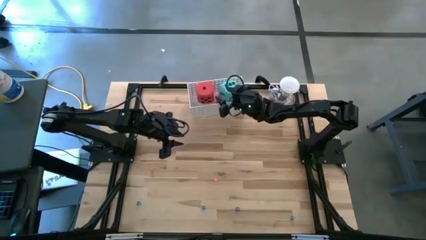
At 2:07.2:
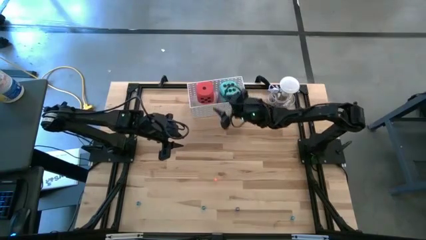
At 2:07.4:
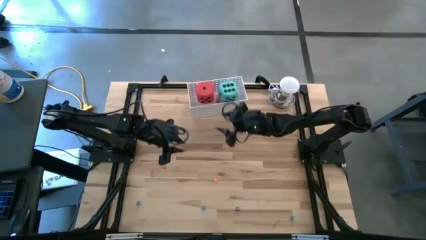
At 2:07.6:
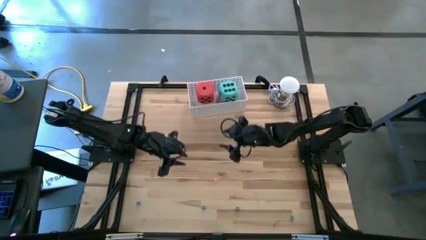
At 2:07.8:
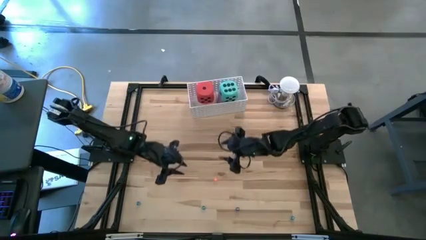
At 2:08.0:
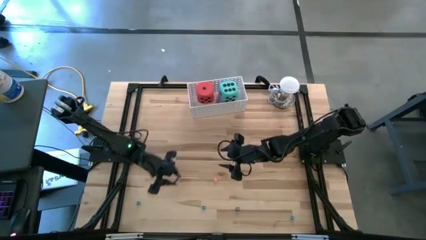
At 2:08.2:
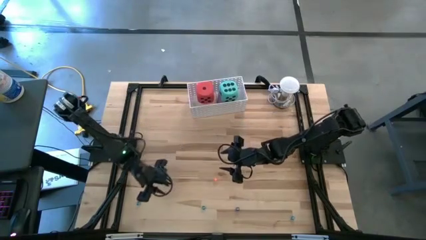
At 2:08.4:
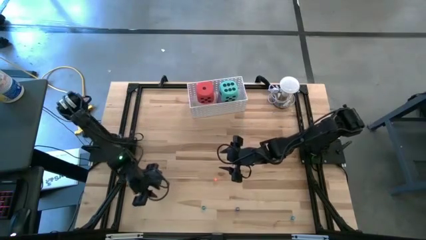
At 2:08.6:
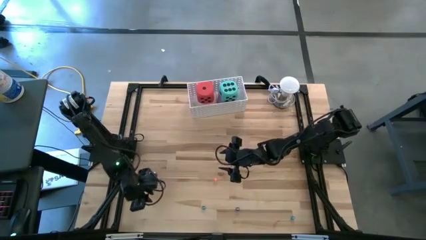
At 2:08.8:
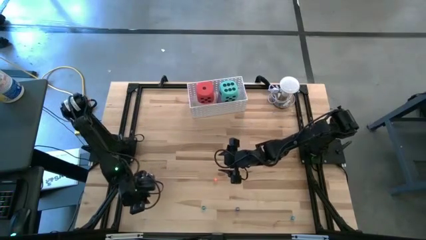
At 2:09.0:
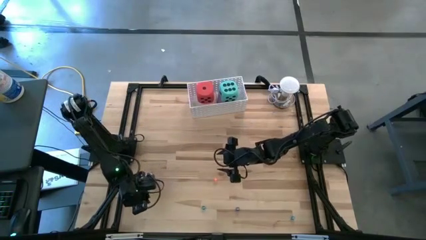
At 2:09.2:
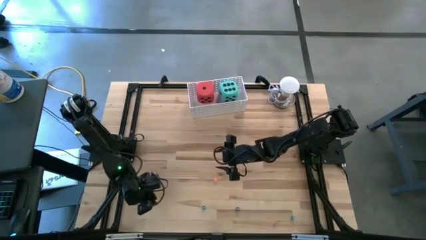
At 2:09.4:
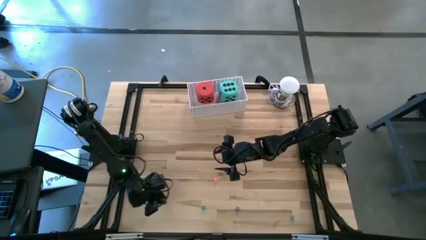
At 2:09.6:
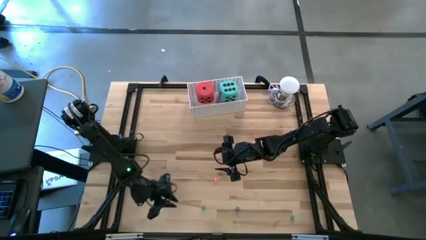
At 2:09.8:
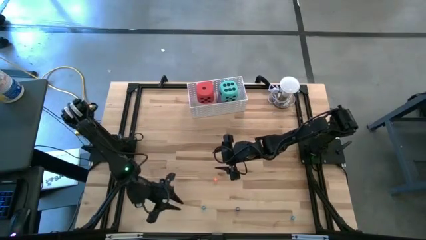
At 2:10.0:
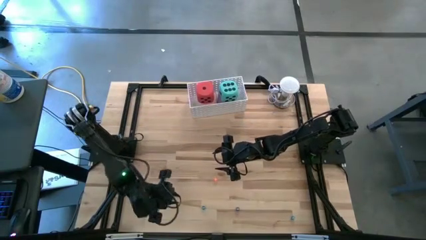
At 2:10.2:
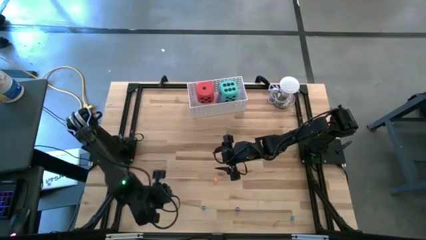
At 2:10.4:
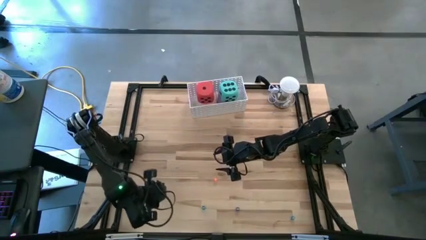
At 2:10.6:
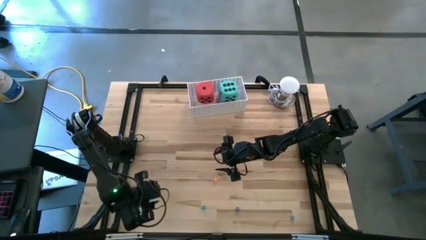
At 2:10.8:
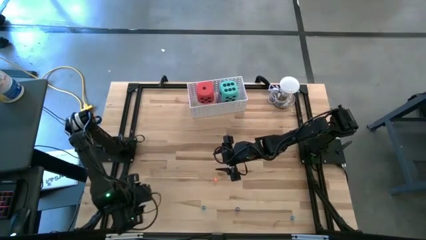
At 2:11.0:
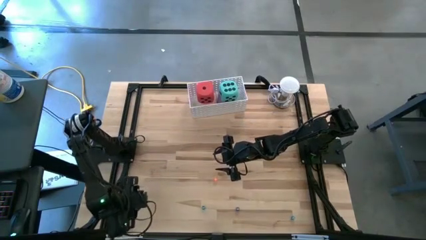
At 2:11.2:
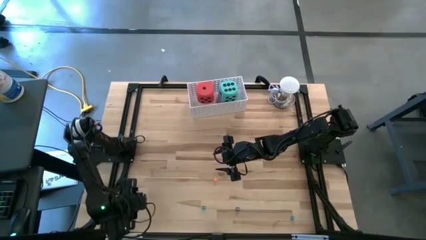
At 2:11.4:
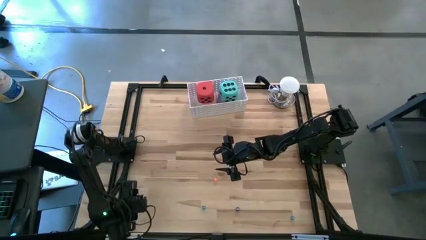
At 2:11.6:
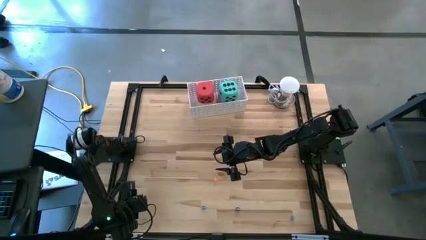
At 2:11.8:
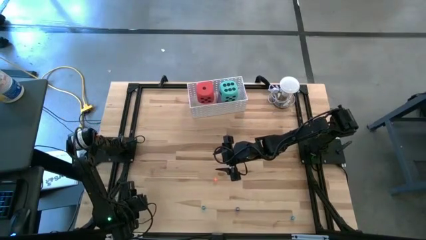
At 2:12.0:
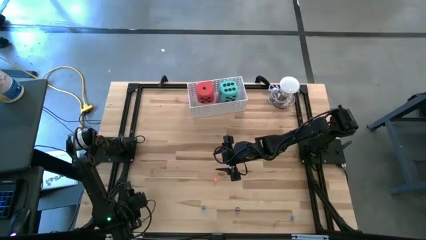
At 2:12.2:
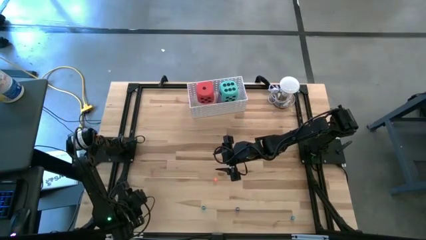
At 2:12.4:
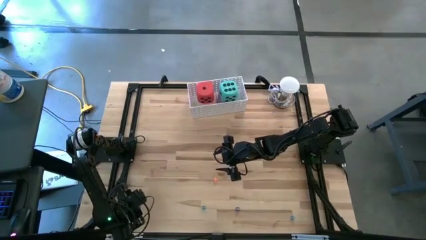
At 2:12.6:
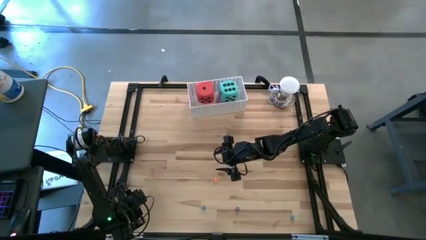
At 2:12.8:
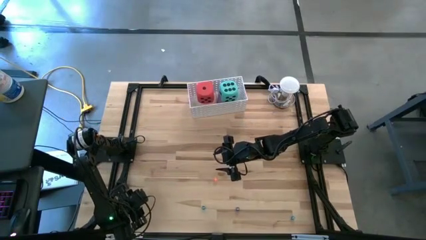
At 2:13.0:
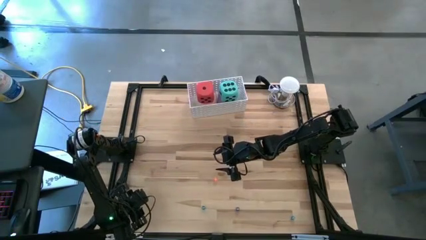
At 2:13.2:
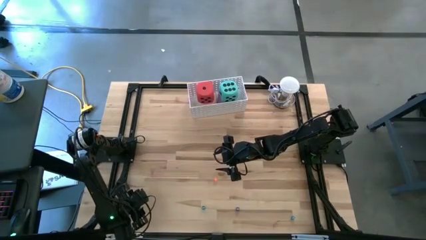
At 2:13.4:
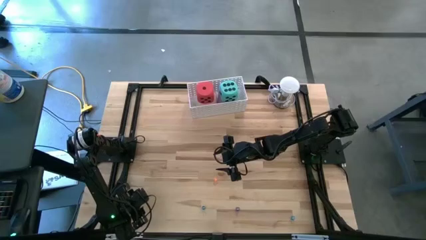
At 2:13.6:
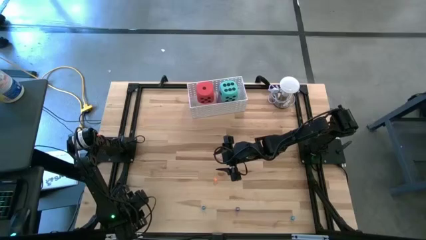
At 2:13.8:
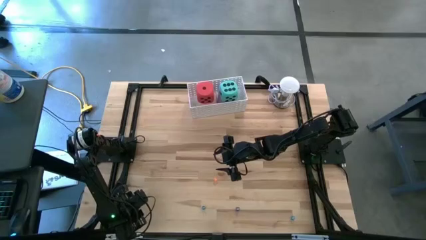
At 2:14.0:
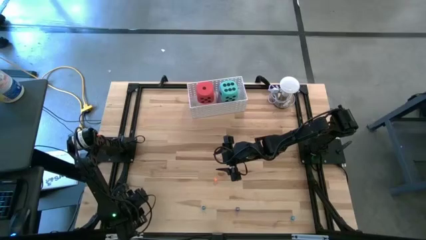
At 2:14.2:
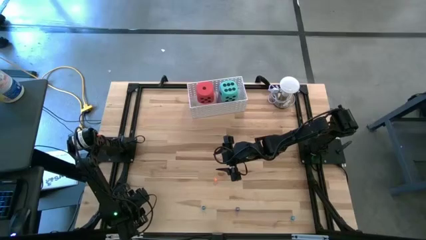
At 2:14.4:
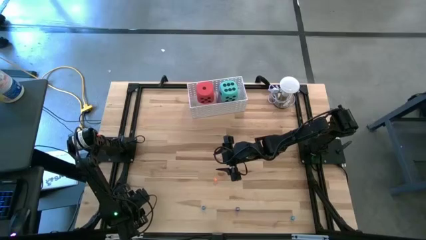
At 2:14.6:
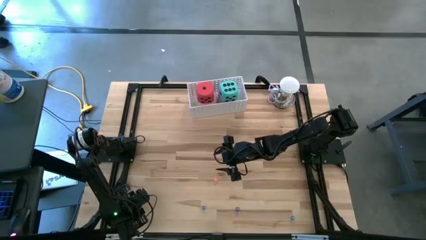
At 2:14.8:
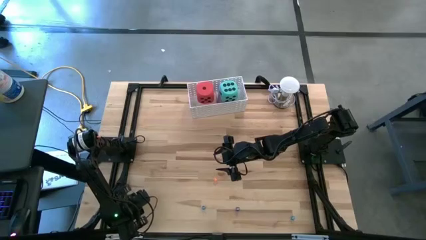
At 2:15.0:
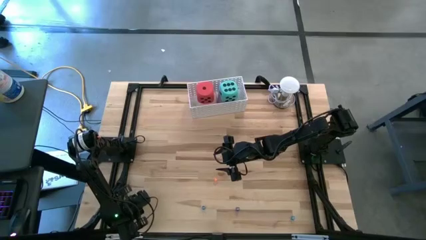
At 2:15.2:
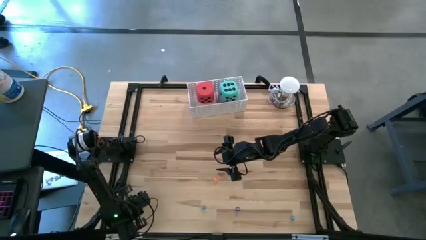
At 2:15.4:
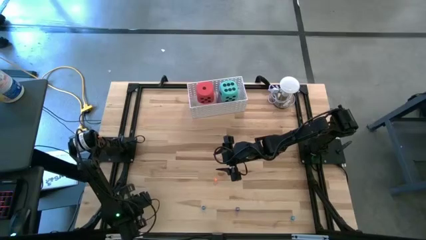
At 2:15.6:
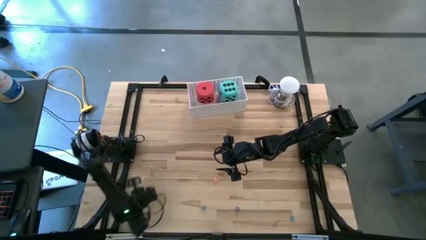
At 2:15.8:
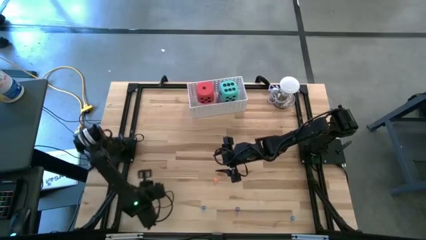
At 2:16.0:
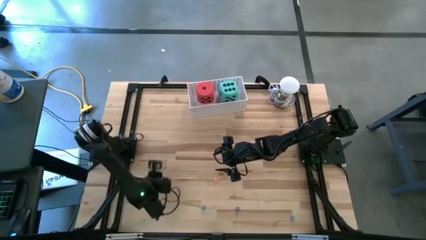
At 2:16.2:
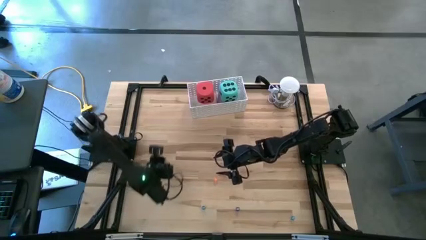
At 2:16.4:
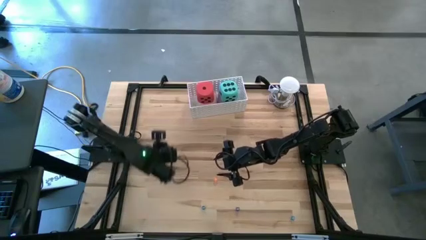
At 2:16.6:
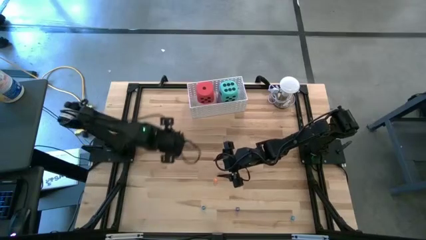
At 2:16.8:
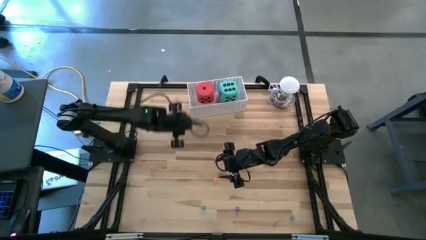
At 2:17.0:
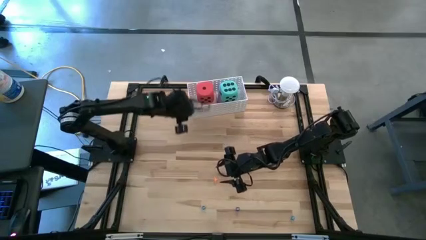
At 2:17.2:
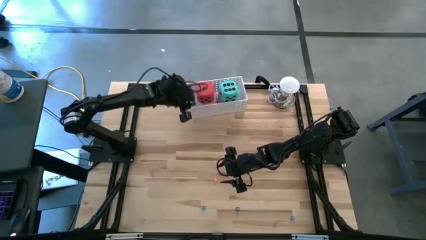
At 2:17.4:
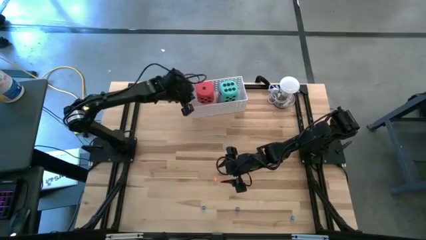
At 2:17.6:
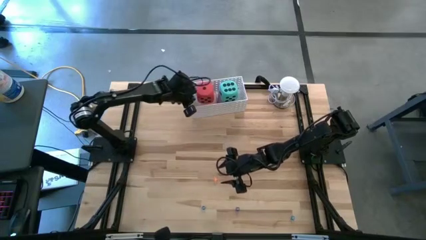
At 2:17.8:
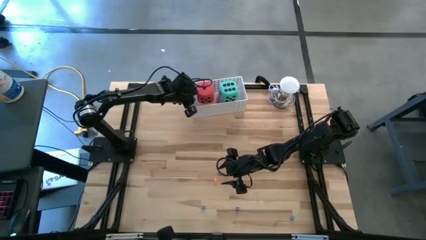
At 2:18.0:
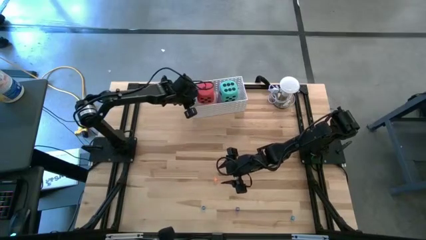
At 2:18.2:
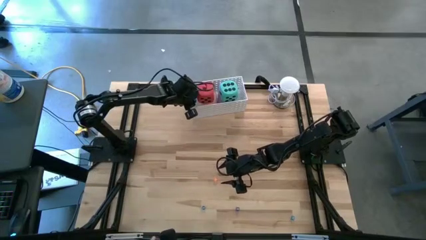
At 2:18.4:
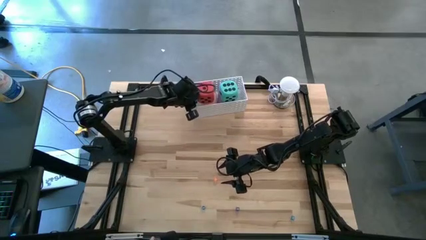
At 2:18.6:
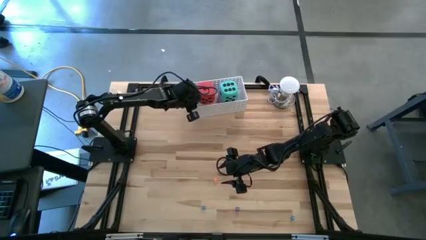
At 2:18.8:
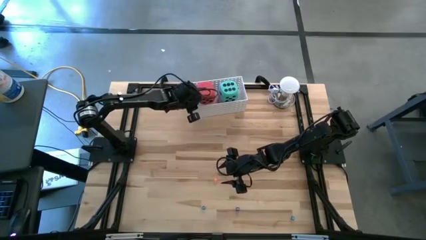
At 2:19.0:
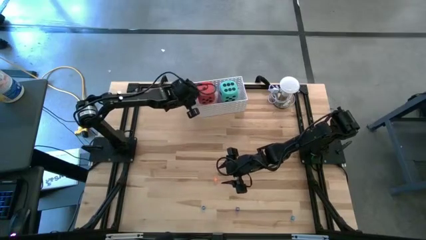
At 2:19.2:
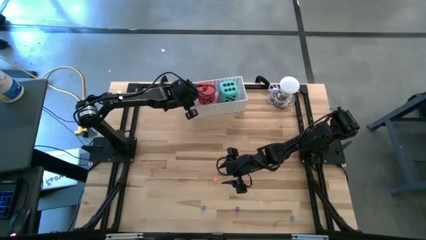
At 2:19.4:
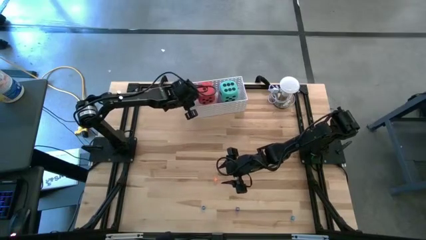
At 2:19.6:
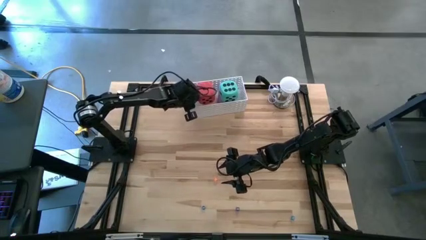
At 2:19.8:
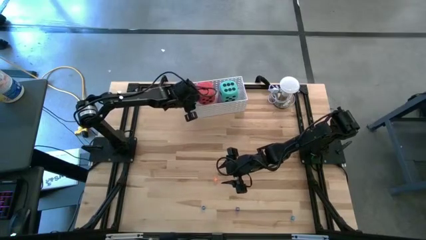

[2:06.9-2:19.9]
Task: Pick & Place Dice
Put the left small light blue dice into the white bin

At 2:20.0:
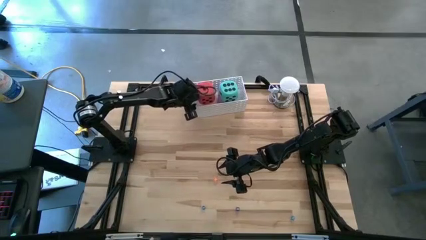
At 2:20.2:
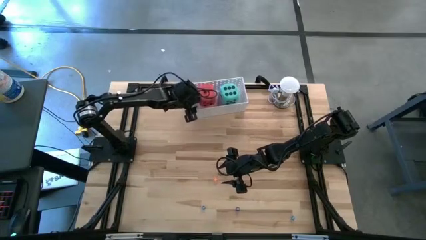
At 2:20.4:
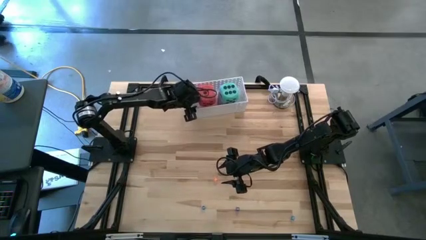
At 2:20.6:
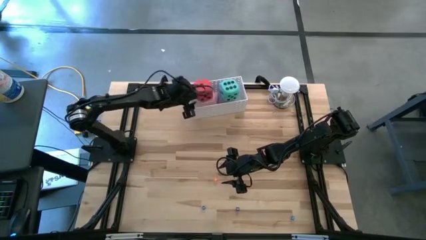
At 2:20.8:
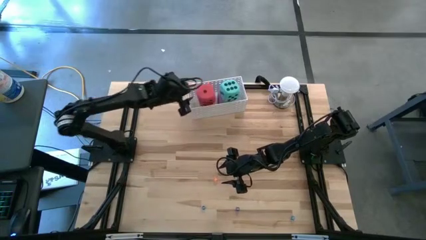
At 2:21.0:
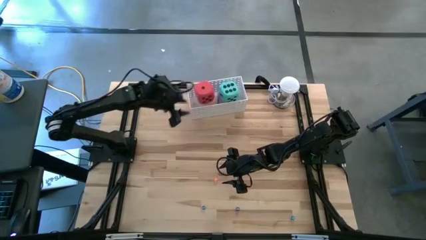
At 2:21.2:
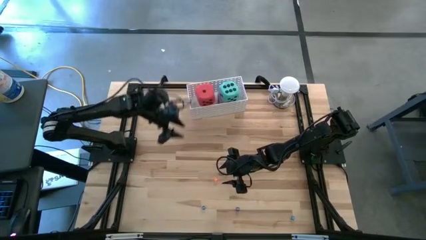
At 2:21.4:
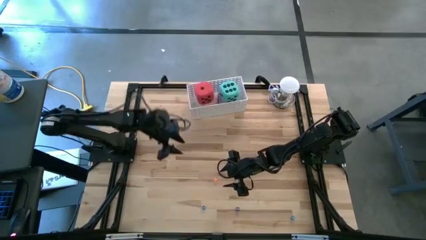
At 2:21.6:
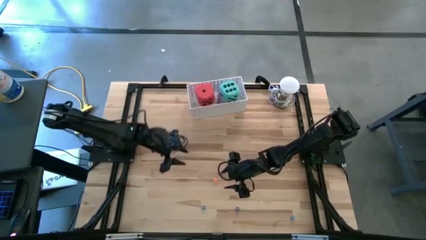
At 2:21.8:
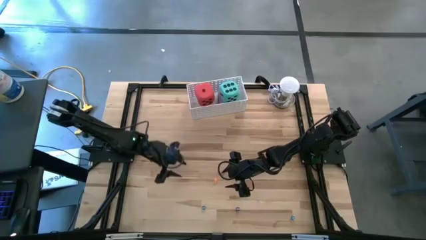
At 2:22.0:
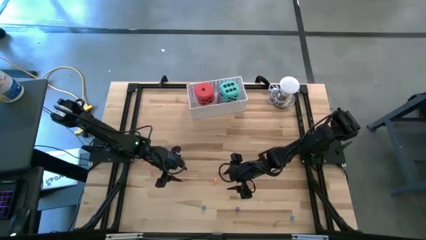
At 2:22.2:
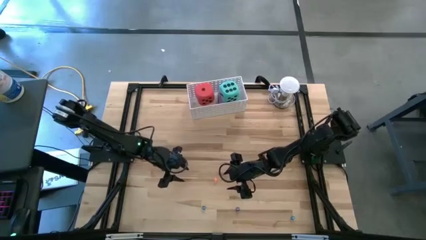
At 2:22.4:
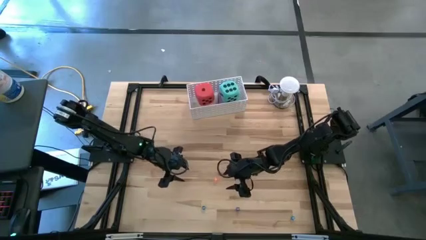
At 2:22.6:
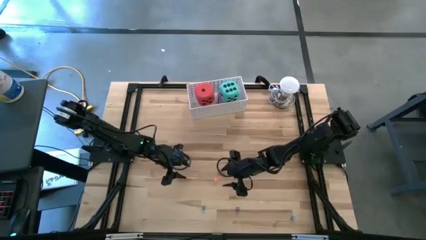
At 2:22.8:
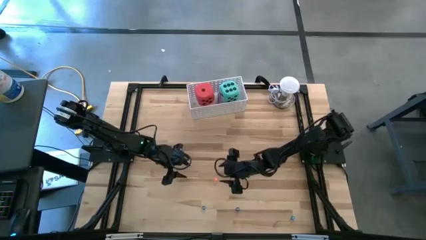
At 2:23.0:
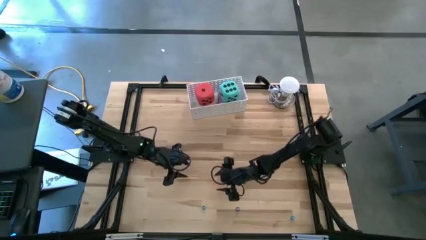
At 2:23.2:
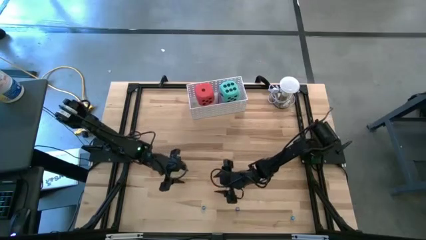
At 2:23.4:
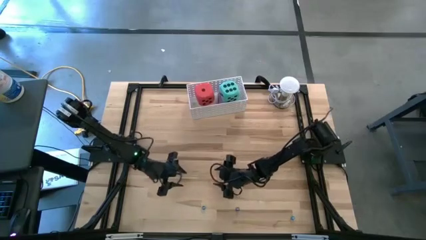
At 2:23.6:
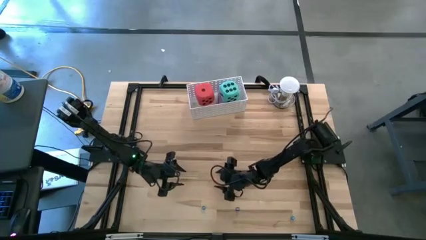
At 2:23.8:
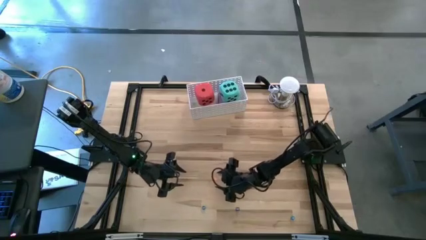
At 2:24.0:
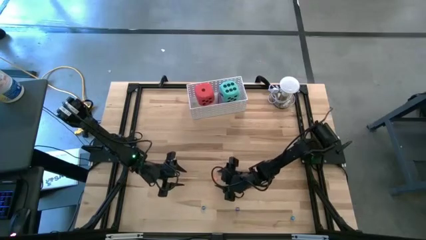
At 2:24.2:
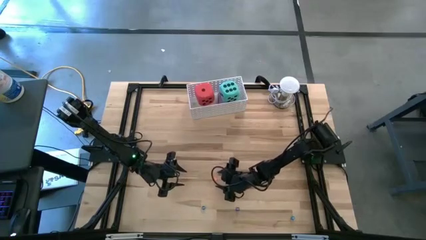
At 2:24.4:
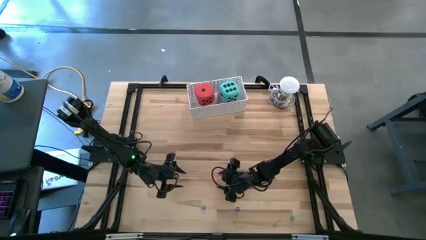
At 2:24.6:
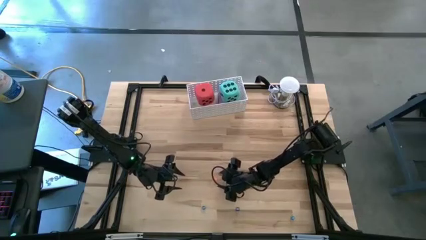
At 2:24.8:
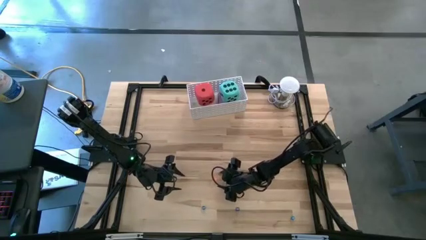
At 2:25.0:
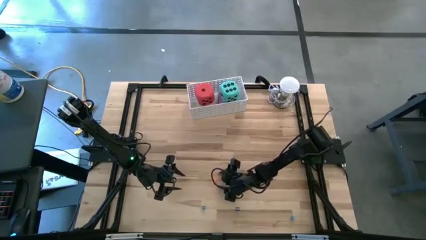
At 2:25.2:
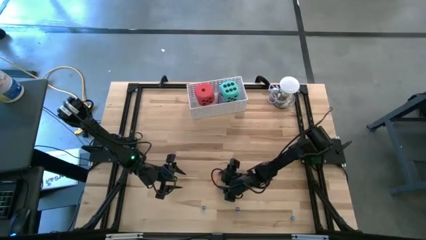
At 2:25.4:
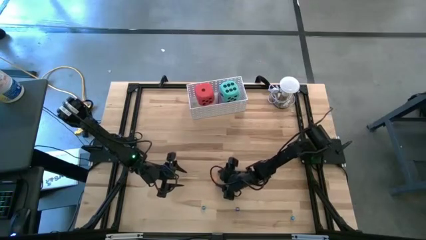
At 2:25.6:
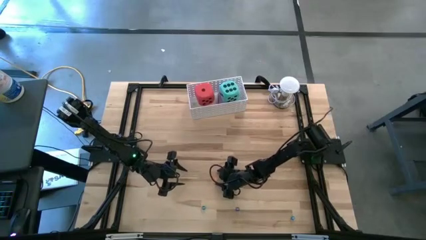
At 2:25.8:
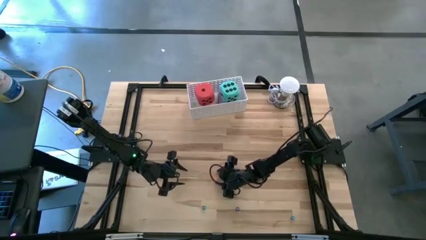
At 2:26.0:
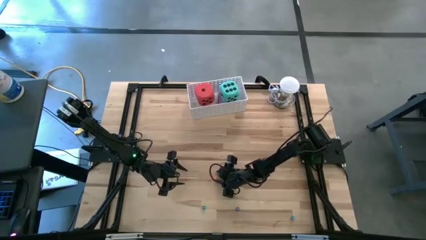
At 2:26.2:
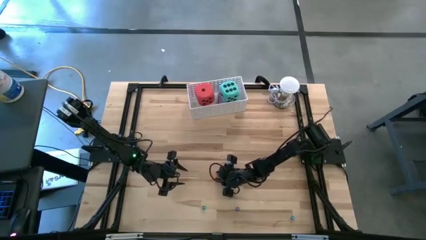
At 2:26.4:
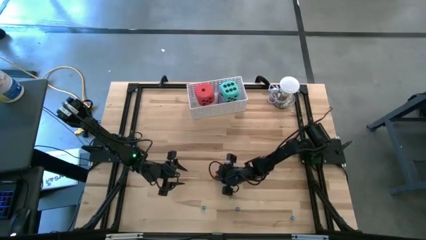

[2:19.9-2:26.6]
Put the small orange dice into the white bin
